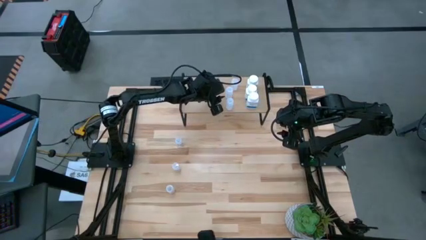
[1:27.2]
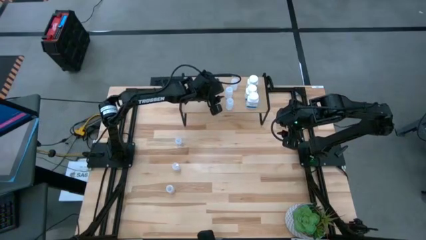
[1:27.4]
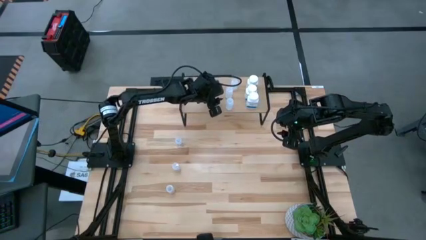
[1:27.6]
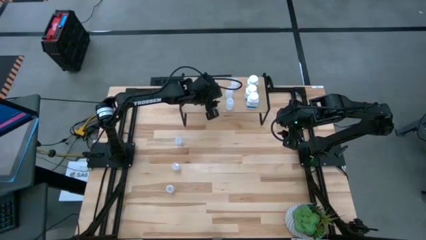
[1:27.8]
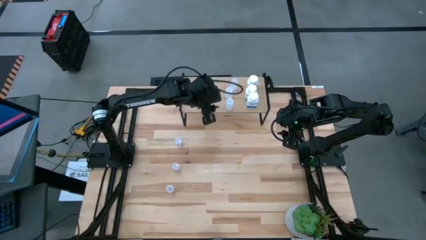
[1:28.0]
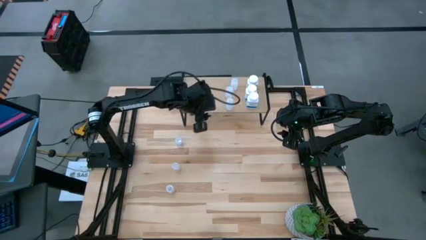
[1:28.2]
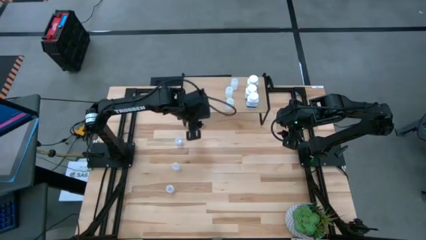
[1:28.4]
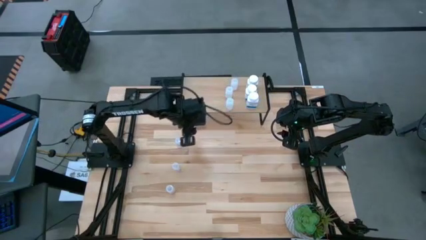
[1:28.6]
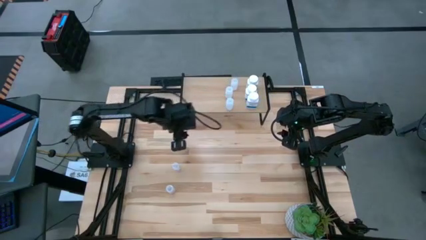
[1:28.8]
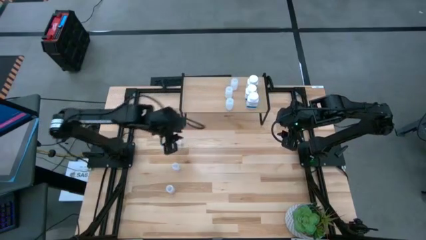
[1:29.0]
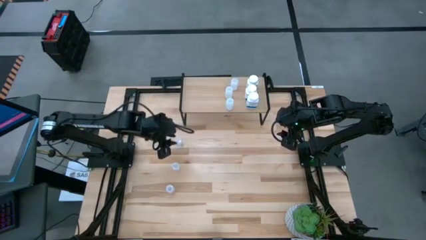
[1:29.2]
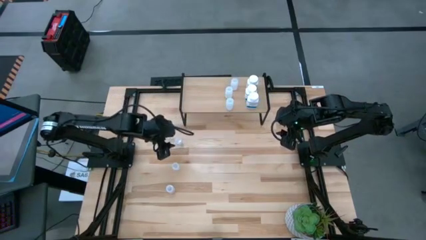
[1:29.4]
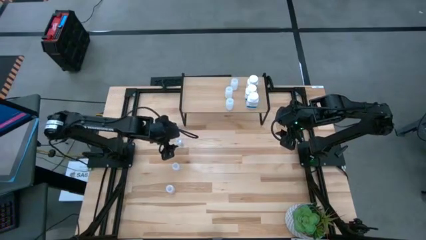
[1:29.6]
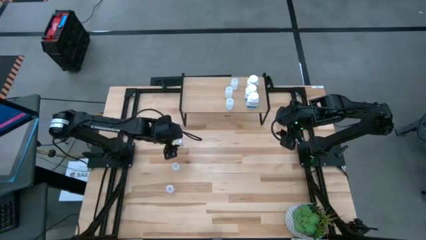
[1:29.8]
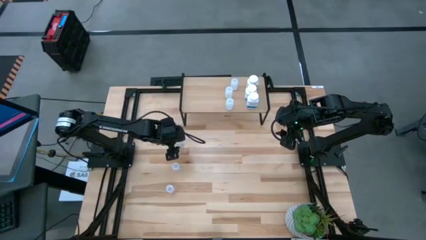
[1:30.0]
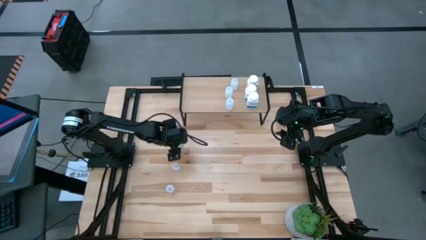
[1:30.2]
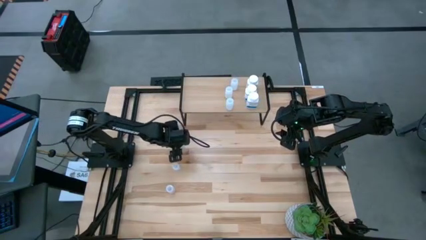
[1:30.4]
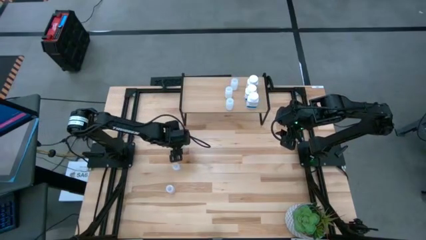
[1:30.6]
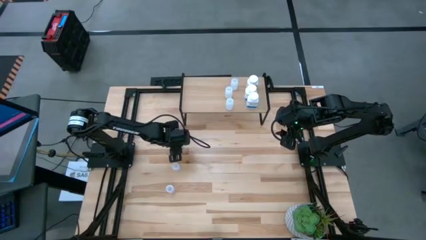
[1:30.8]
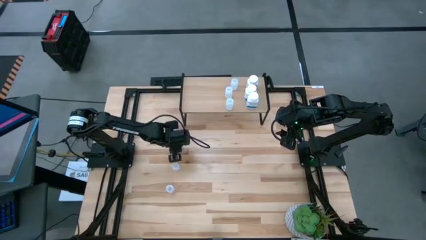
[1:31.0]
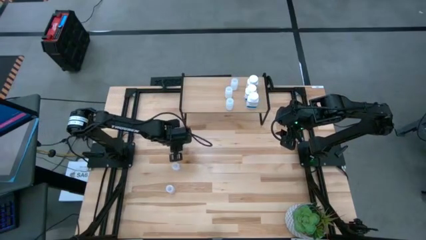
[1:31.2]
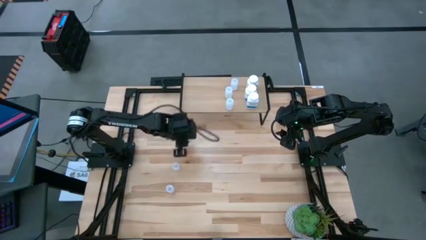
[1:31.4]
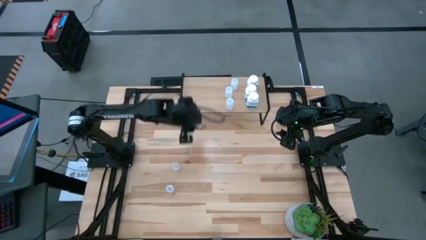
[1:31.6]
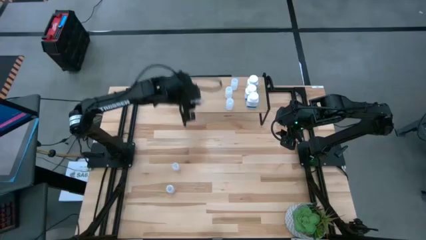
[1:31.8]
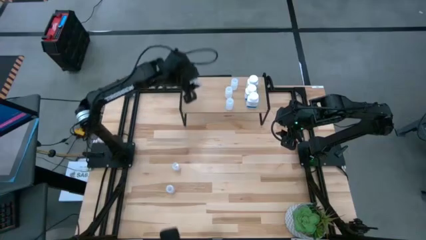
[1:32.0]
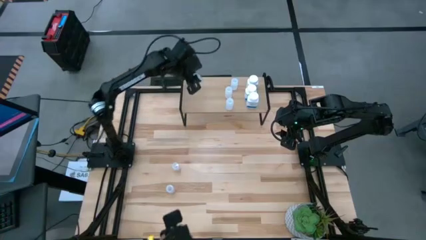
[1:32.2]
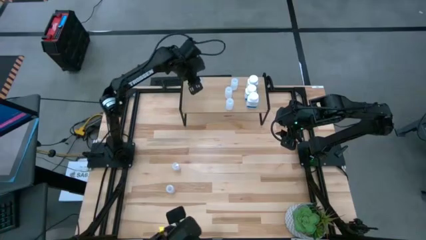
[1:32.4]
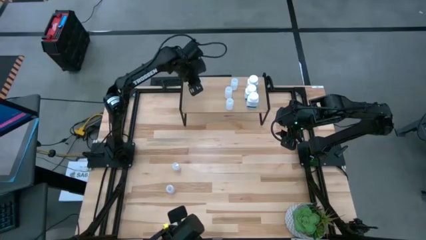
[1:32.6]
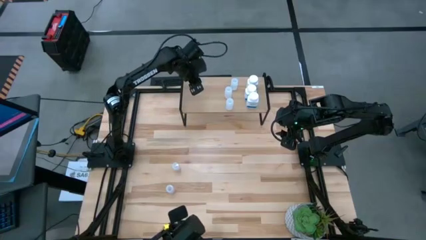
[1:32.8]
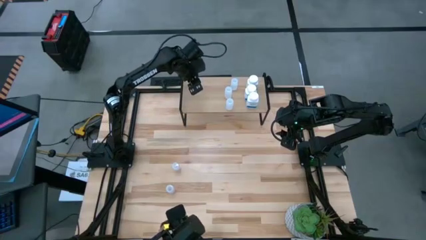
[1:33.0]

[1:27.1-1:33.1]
Task: Pick and place medicine bottles onto shelf by color
Put the small transparent pill bottle on the shelf

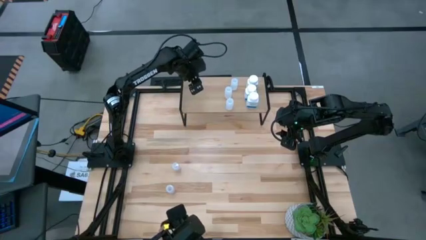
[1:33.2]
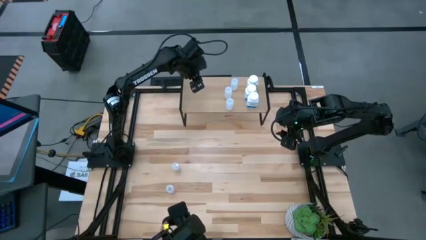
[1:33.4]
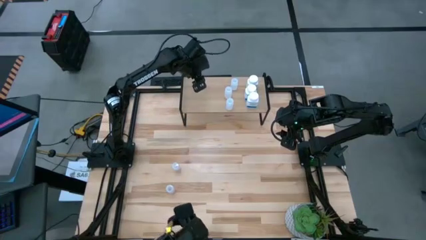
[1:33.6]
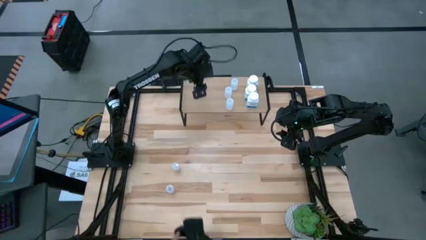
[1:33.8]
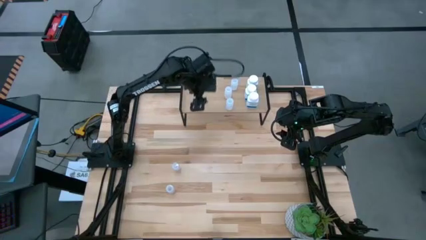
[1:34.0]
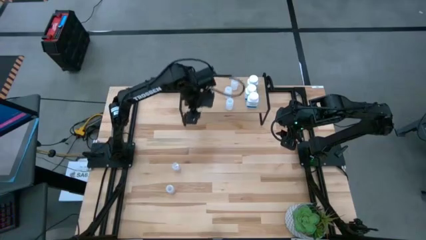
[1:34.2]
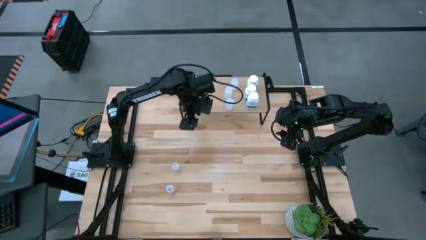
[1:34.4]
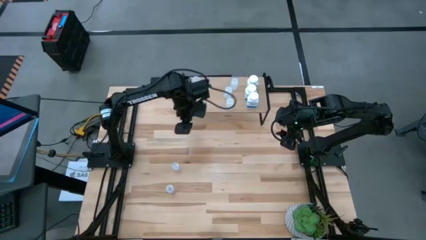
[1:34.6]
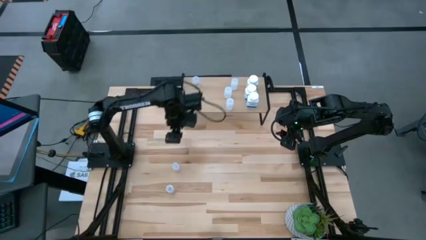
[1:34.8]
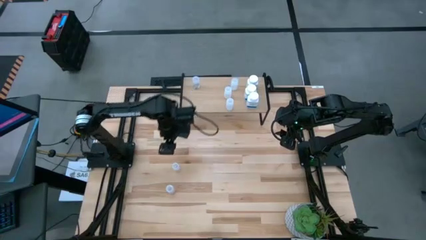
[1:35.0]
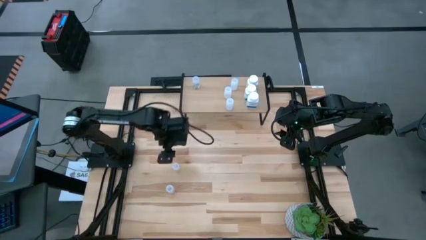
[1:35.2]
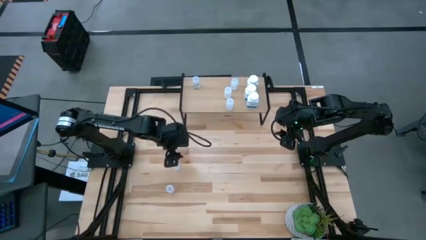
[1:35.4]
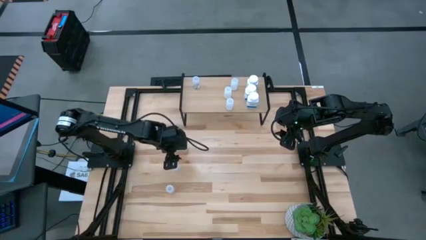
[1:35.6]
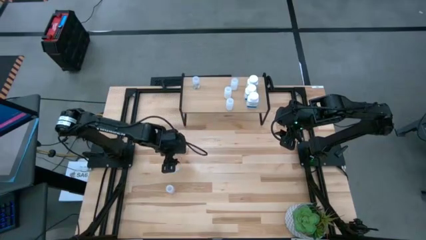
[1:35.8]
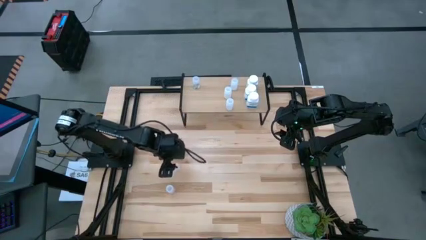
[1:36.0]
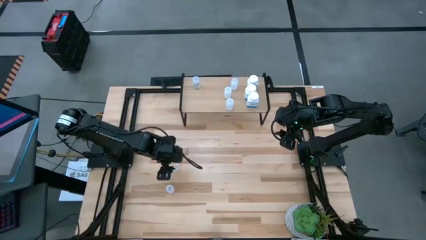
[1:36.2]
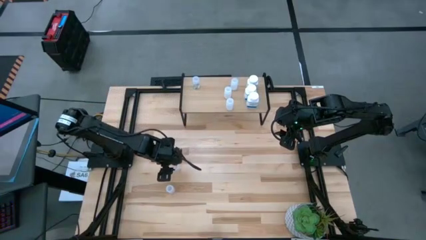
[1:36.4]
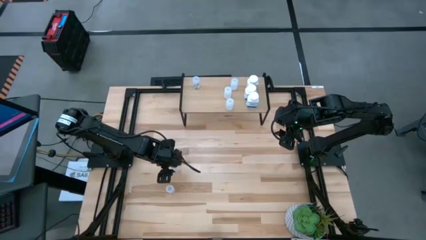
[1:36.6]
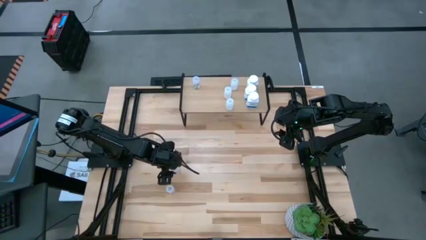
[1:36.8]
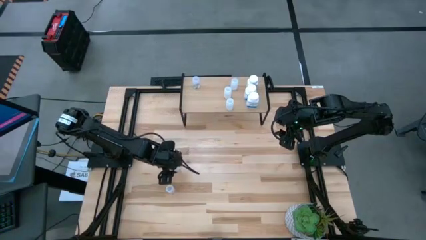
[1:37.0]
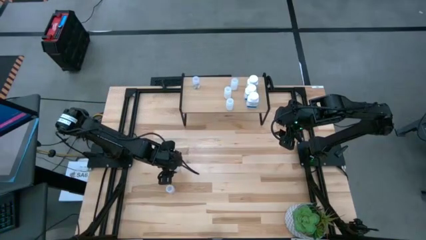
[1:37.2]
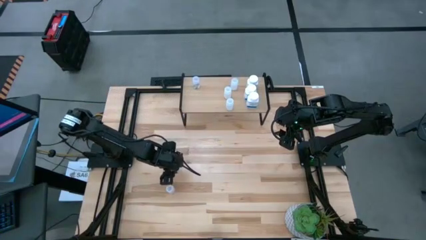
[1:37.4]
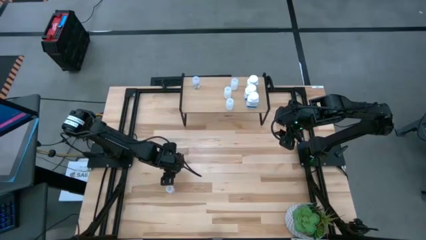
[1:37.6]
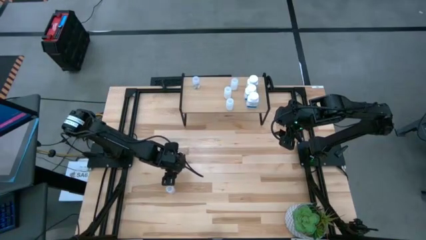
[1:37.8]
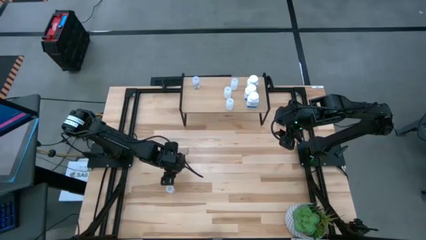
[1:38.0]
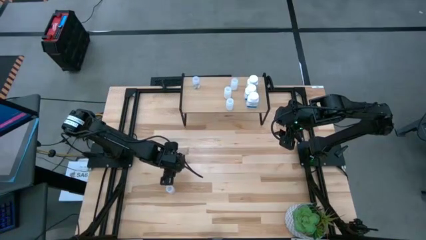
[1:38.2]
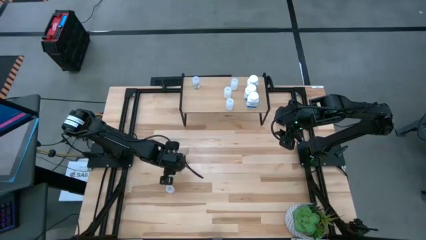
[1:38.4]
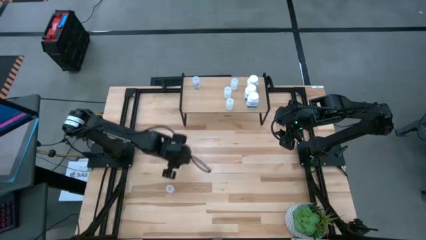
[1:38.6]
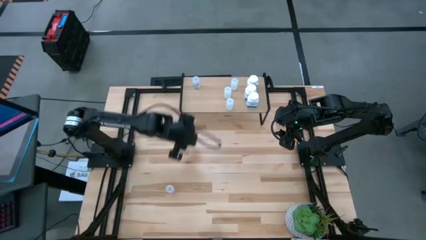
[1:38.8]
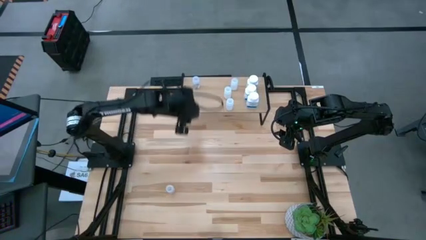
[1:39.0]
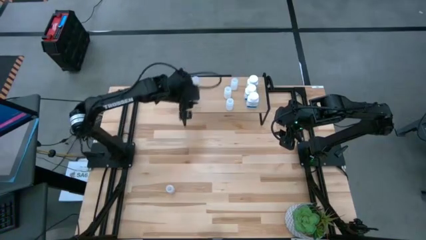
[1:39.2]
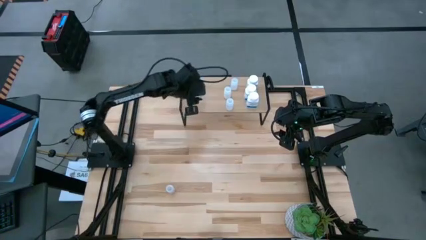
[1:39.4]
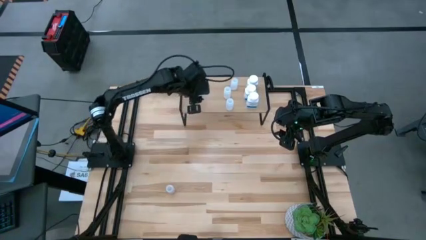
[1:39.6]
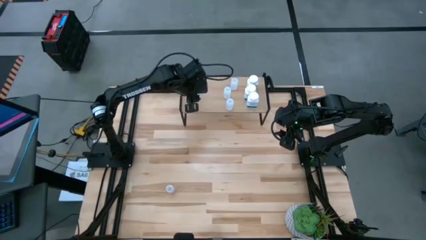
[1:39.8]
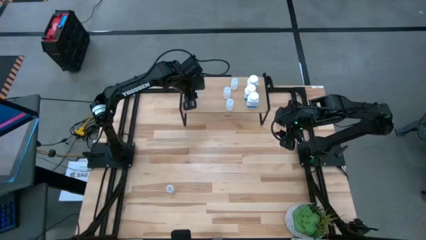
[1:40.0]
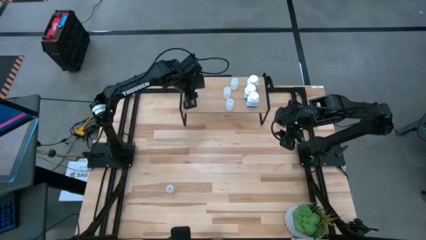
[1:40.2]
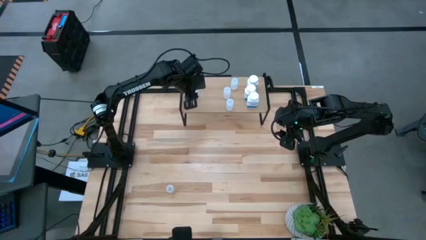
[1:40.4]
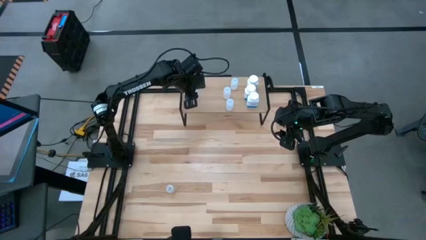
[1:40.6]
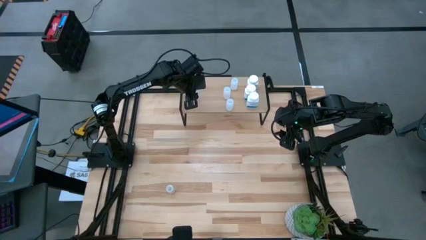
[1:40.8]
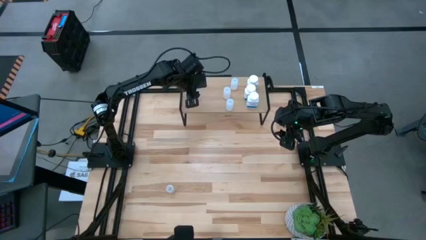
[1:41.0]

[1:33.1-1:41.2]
Put the small transparent pill bottle on the shelf aligned with the other small pill bottle
